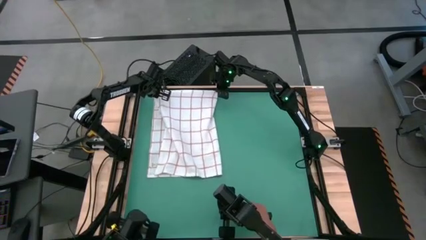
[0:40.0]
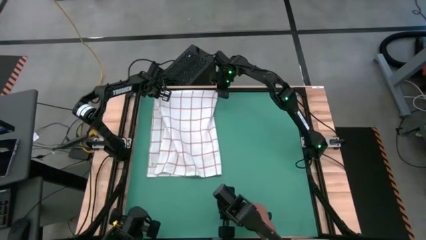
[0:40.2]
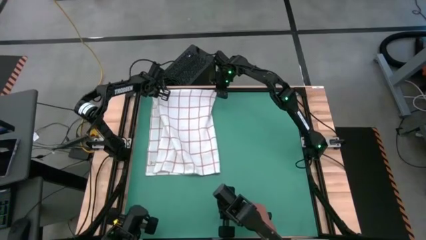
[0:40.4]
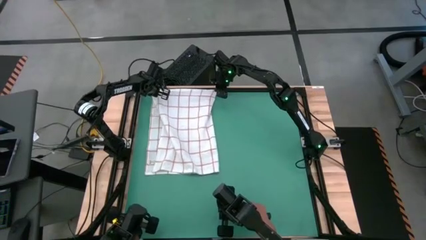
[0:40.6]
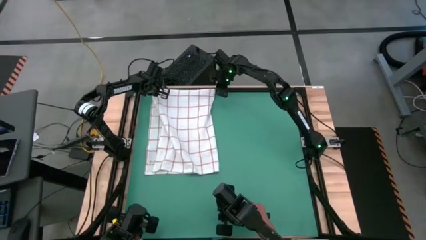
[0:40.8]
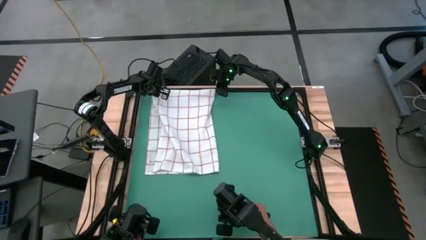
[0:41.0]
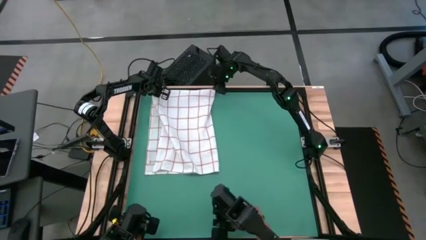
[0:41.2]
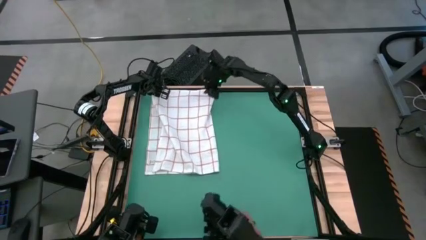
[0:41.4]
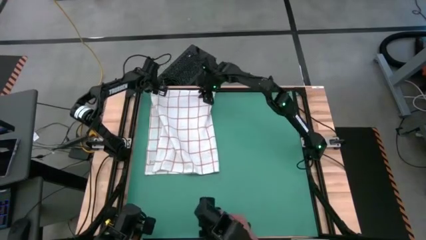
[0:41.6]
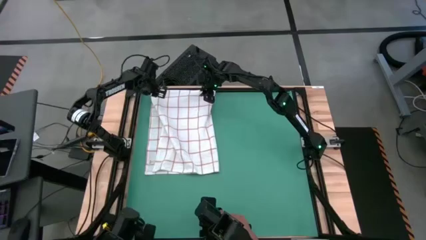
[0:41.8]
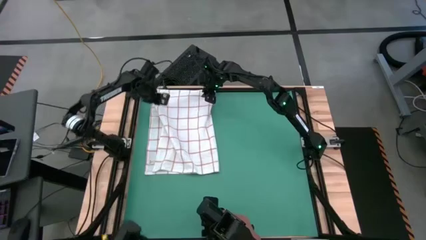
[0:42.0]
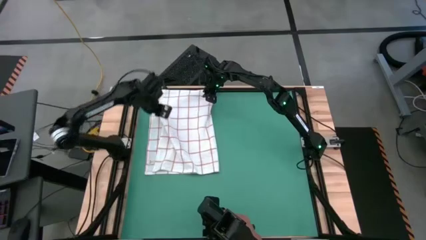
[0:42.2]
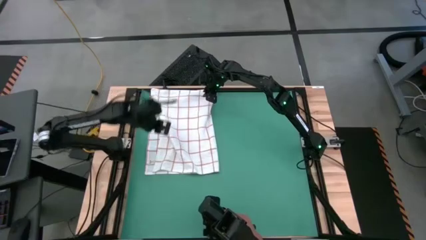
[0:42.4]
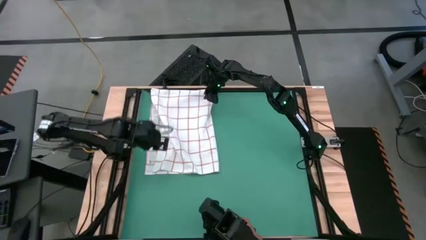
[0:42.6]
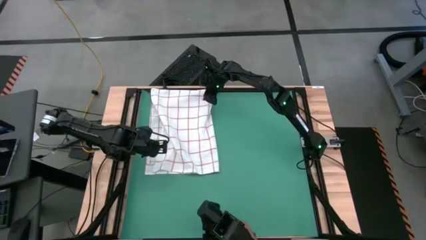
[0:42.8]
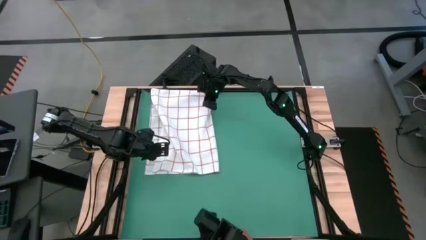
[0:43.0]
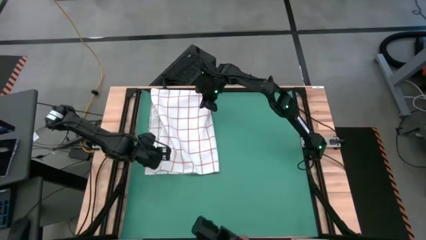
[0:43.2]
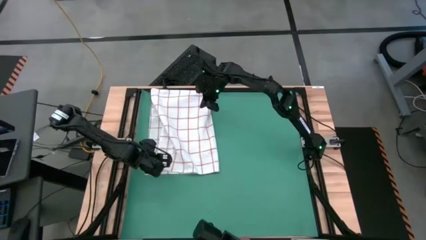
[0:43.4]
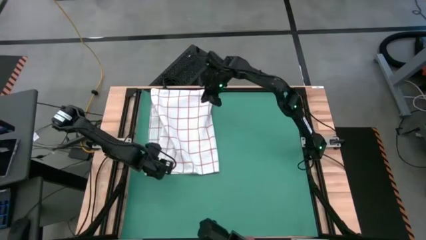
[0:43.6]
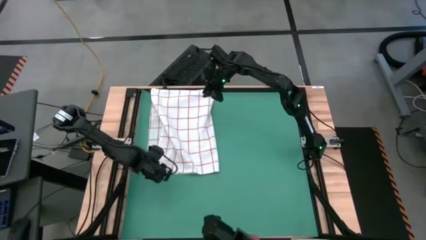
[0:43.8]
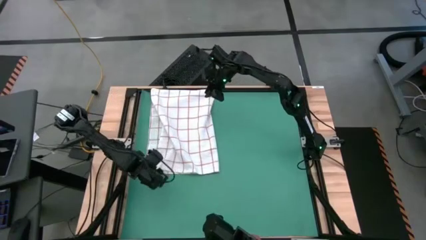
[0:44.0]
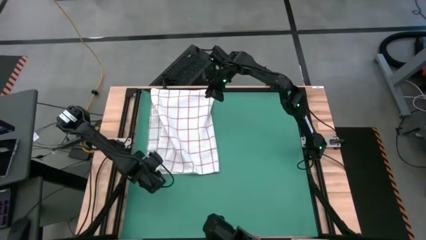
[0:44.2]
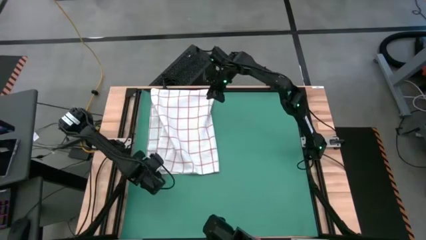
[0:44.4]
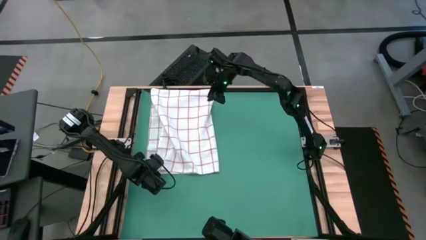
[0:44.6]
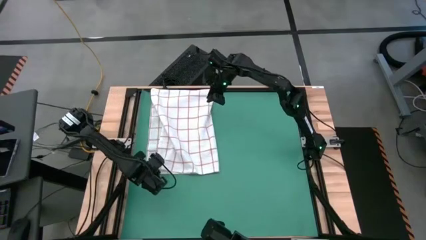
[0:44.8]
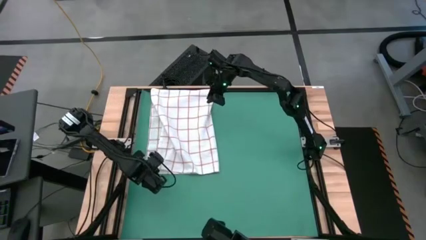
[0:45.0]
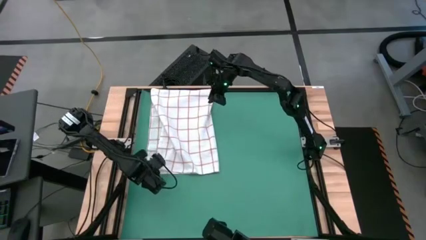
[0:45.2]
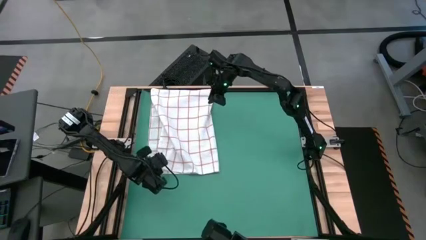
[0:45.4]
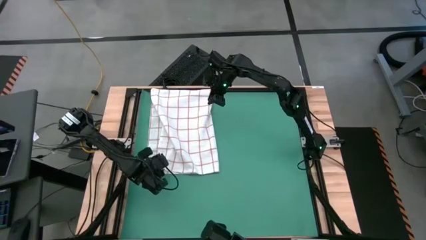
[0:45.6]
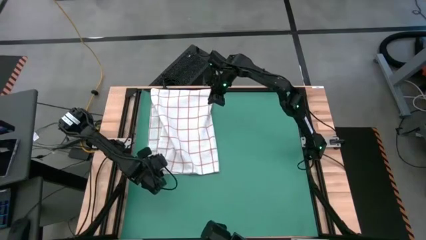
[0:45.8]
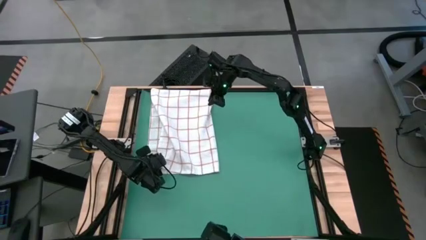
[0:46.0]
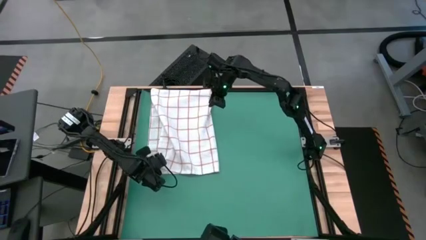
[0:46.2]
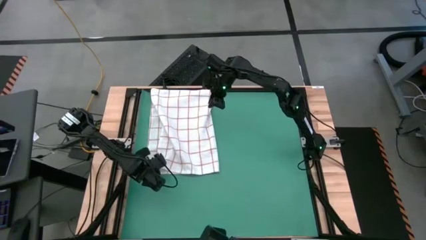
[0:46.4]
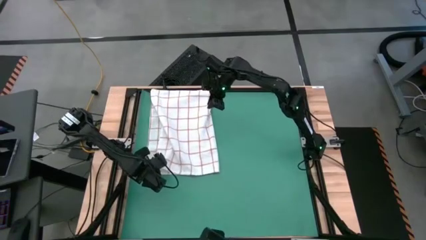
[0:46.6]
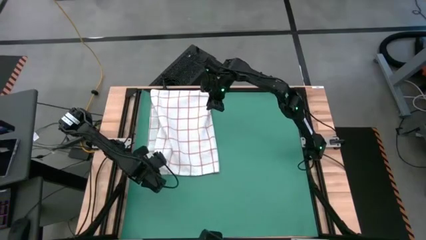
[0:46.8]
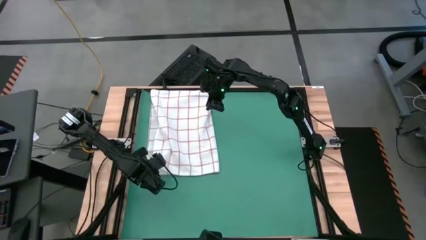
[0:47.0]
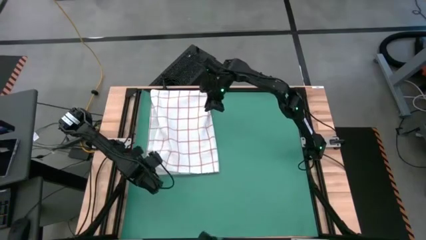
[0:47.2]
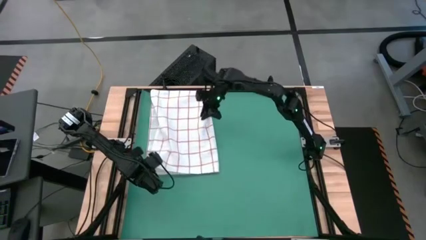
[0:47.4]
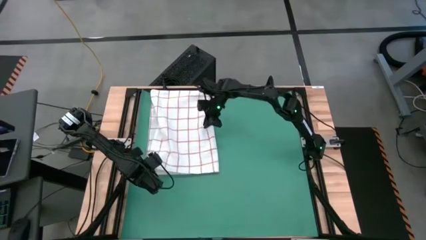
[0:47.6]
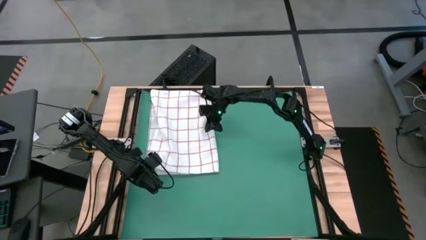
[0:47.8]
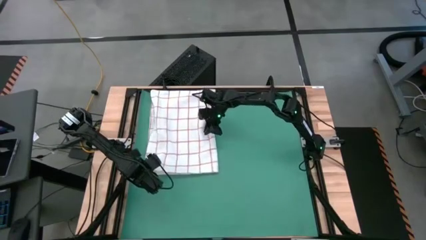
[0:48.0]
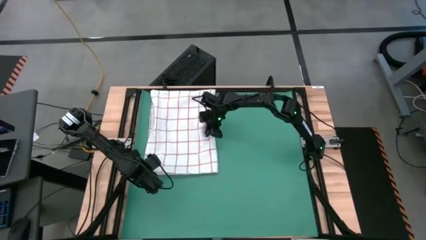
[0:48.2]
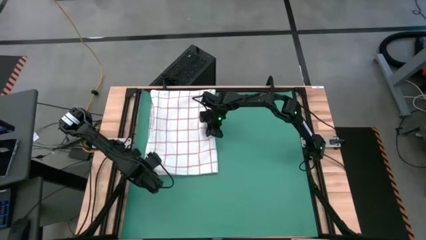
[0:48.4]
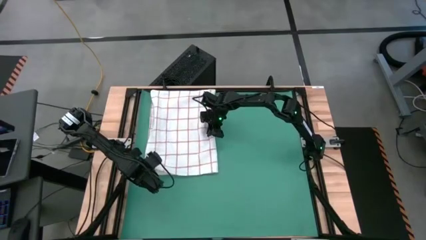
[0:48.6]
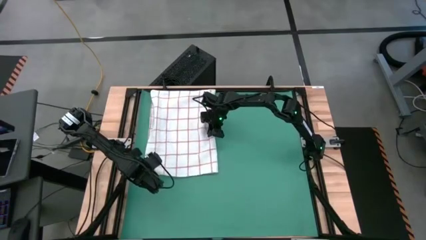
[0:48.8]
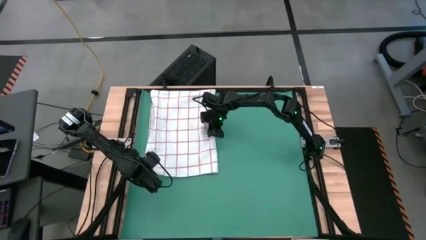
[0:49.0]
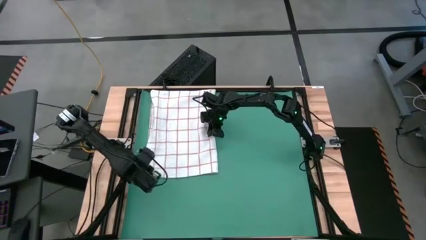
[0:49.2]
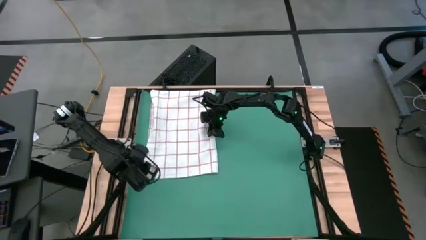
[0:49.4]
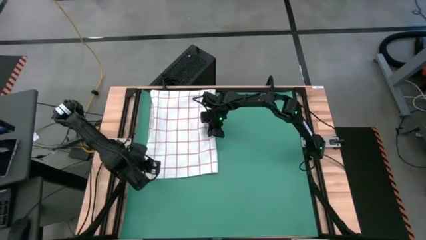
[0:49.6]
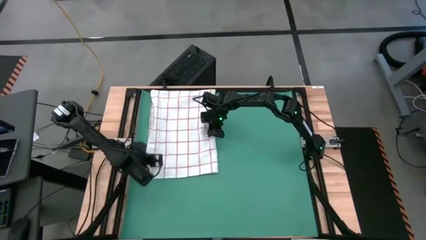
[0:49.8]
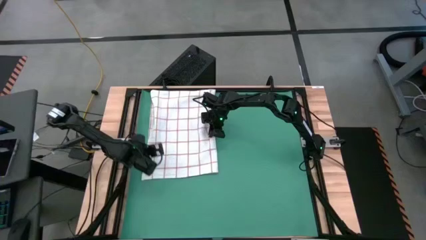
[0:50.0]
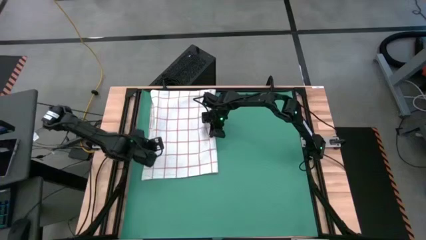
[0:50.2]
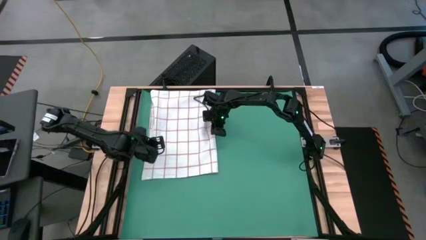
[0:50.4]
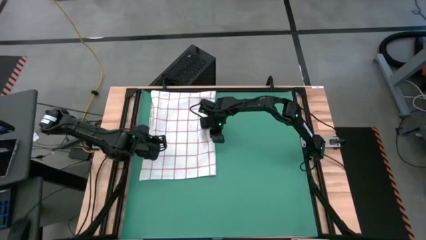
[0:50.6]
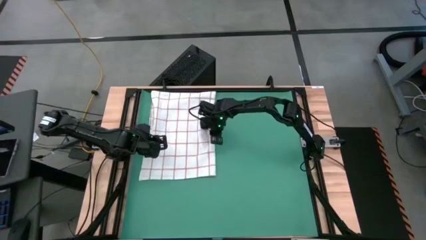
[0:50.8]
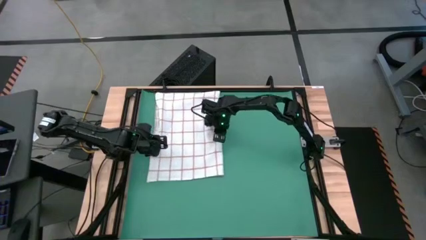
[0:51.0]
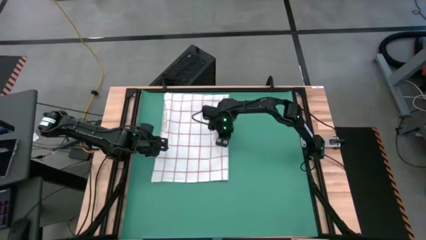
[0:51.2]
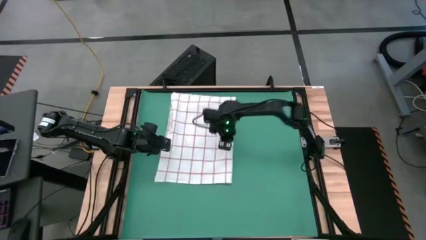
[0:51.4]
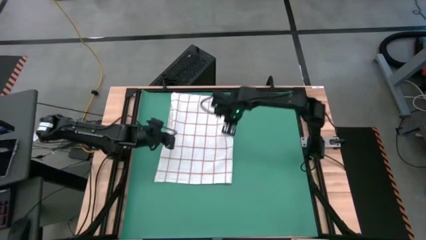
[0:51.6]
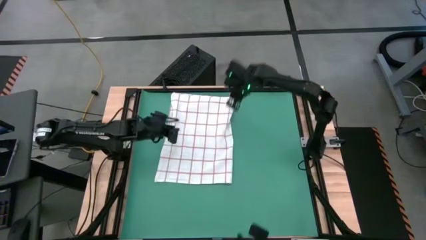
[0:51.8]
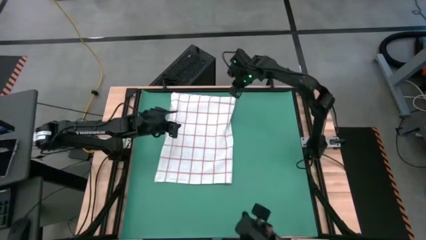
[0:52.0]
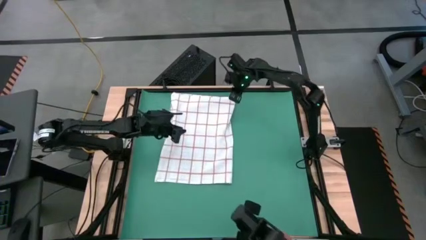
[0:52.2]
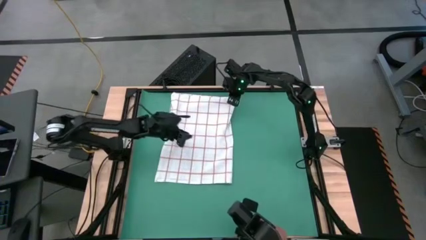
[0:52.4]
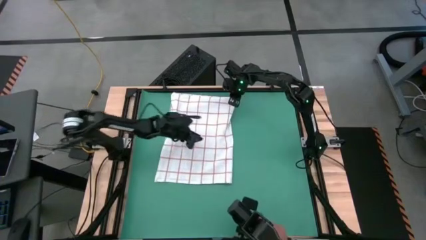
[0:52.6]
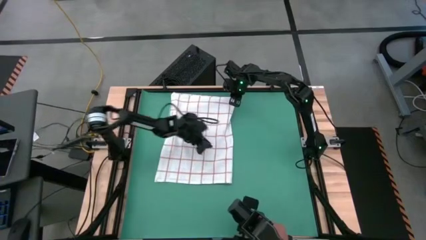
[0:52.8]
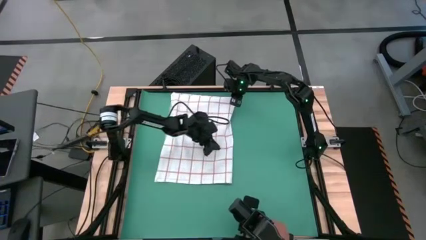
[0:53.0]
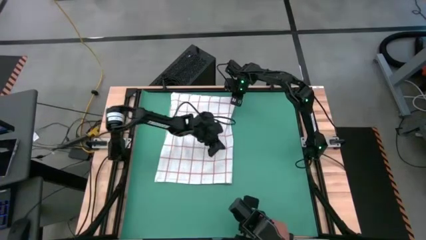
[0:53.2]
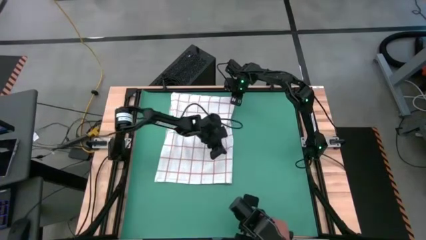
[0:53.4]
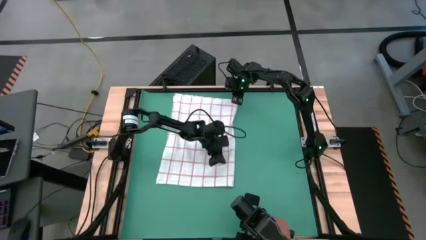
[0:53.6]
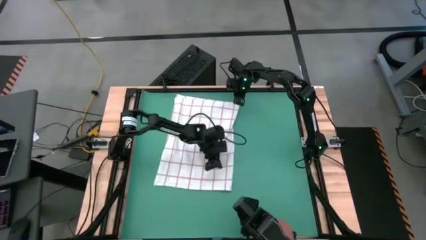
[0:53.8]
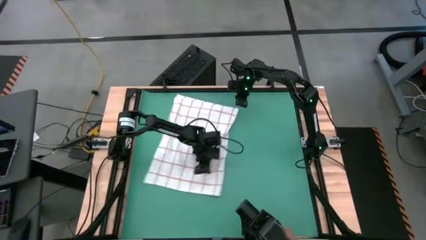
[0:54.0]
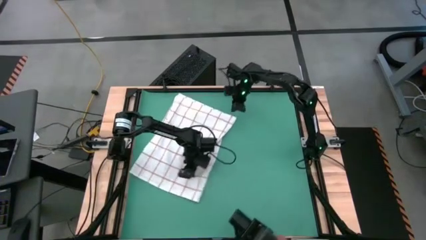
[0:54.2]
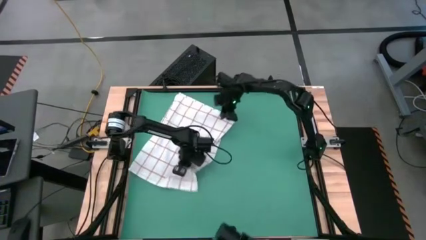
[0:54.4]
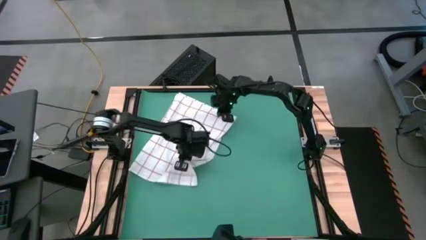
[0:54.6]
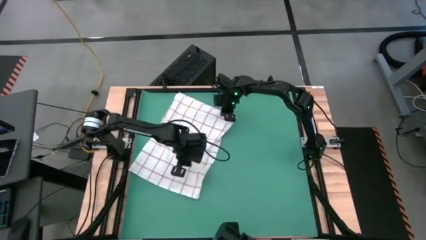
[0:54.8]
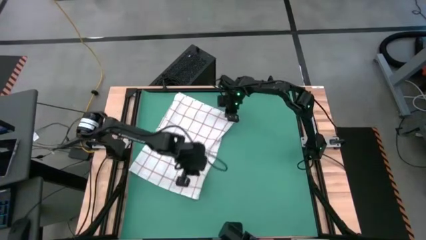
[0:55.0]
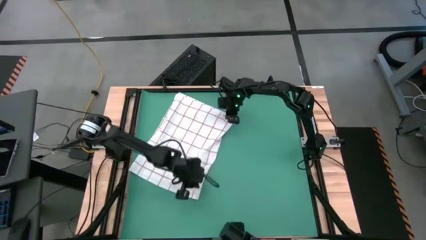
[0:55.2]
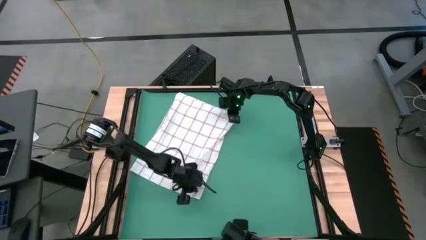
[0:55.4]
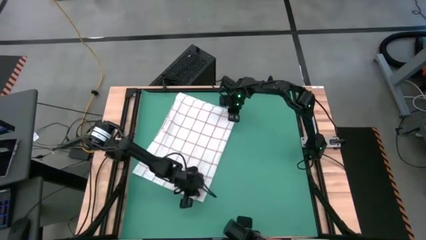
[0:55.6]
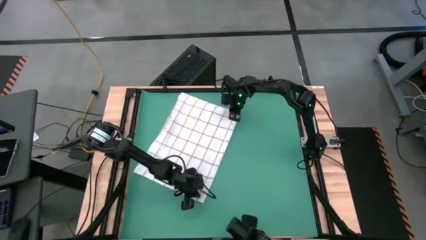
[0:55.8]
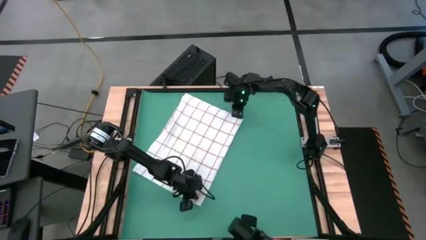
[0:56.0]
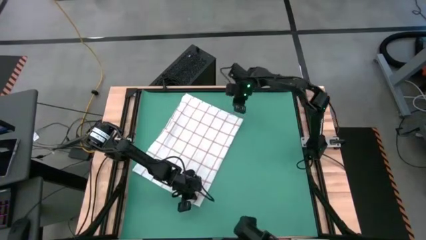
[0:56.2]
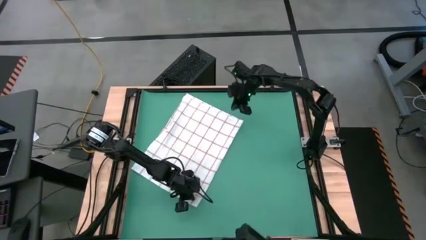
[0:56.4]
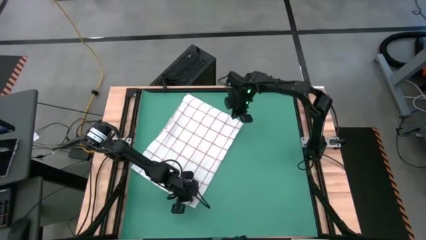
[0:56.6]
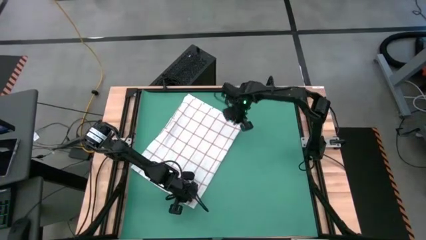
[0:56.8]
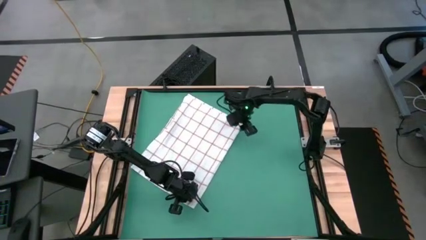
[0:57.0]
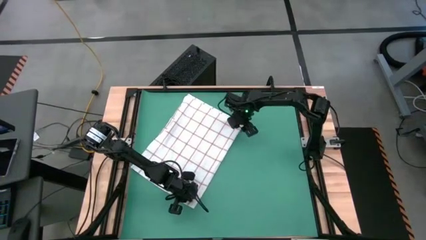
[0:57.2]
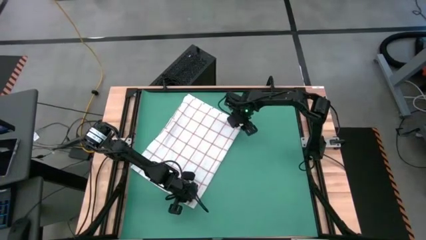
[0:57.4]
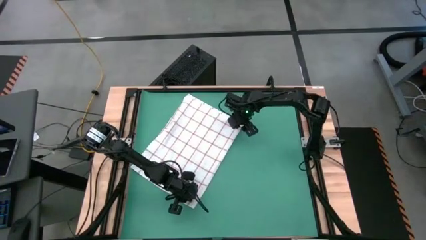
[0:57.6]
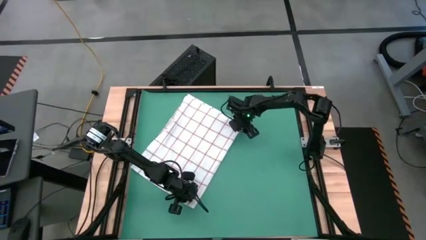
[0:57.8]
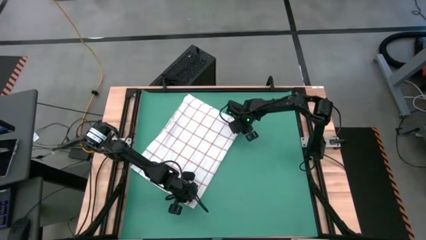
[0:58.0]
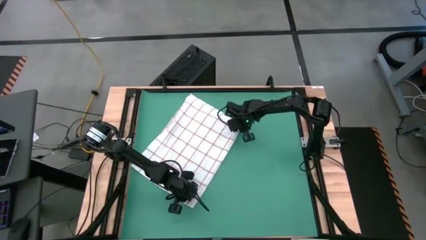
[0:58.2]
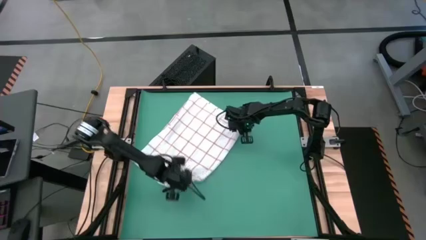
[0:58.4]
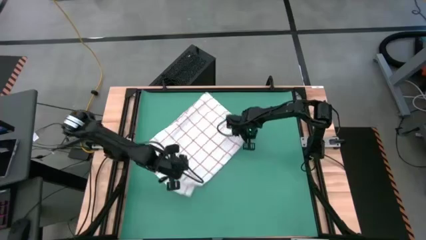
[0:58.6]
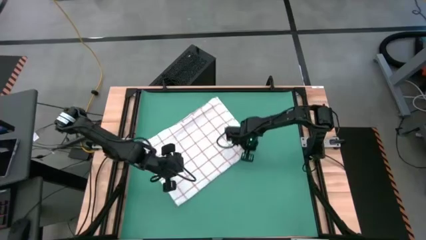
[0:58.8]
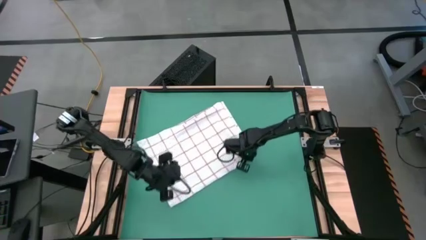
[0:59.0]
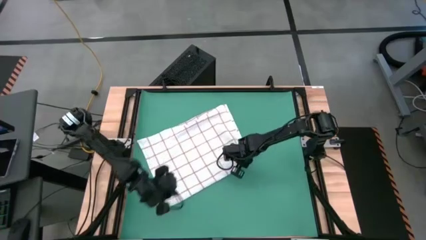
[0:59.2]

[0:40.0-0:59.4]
Task: Roll towel into tight, uniform cylinder
Roll the white towel
